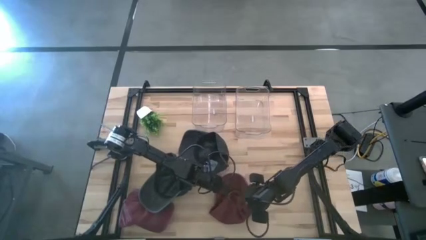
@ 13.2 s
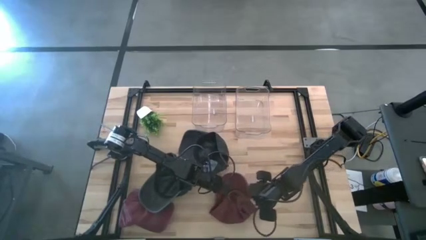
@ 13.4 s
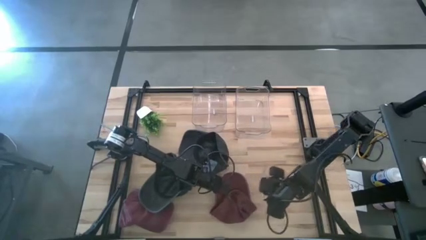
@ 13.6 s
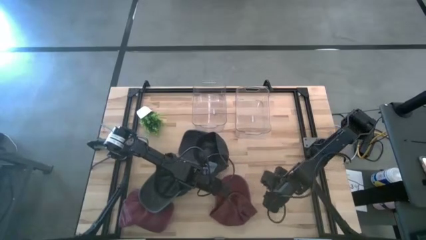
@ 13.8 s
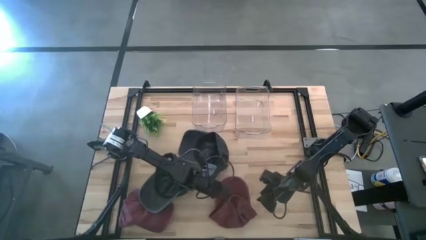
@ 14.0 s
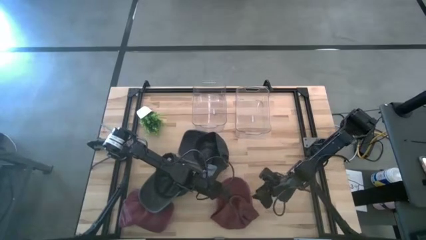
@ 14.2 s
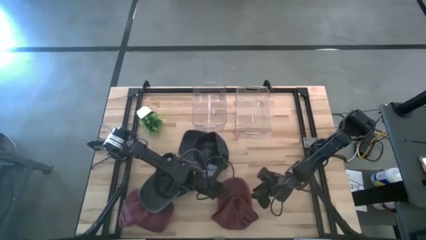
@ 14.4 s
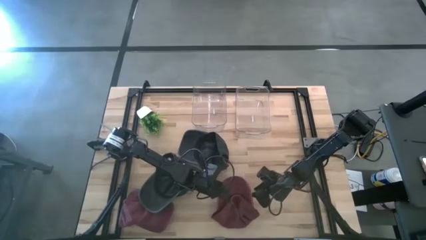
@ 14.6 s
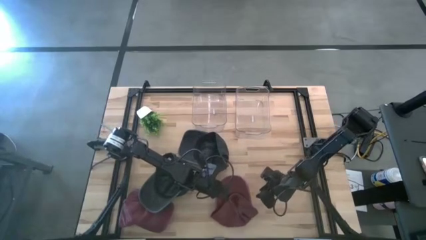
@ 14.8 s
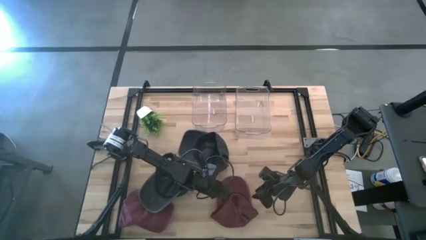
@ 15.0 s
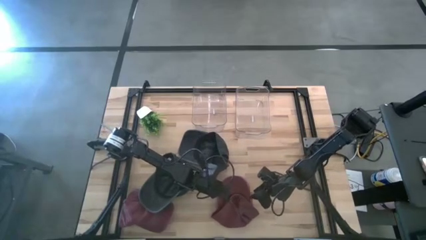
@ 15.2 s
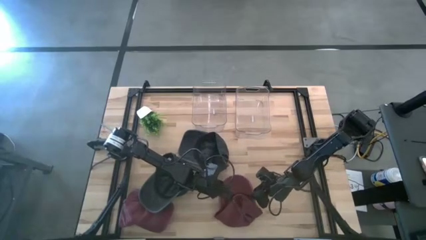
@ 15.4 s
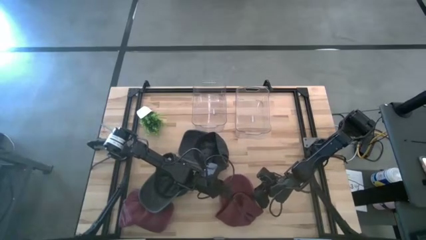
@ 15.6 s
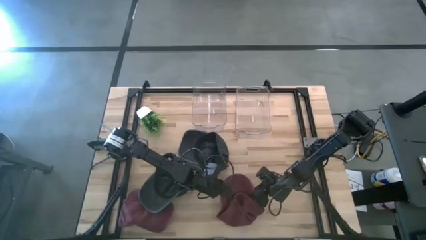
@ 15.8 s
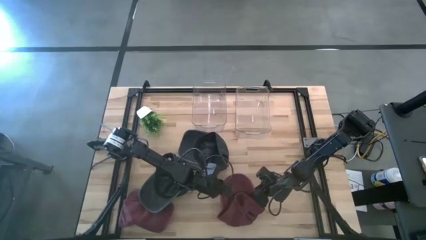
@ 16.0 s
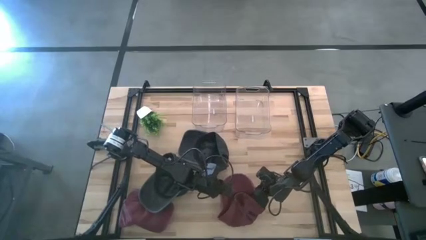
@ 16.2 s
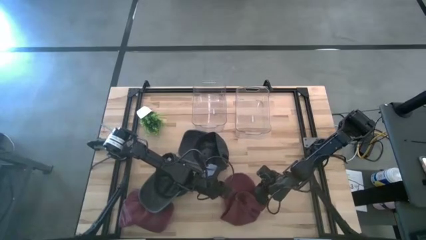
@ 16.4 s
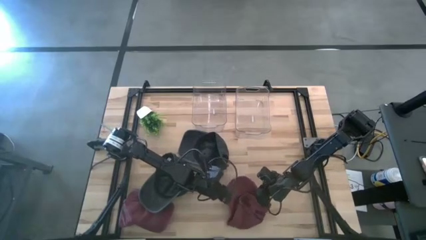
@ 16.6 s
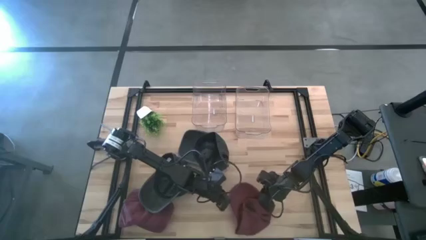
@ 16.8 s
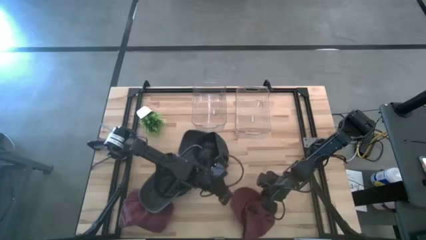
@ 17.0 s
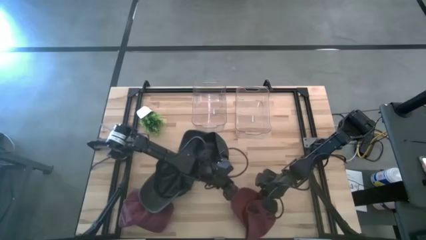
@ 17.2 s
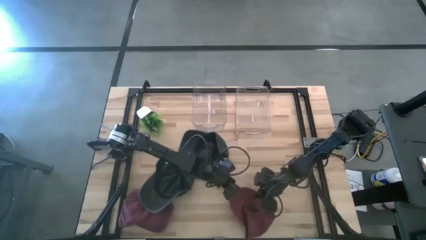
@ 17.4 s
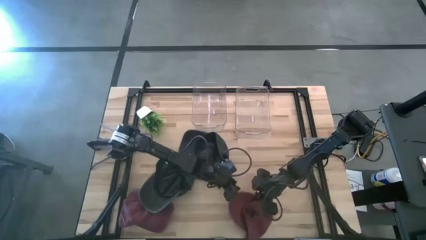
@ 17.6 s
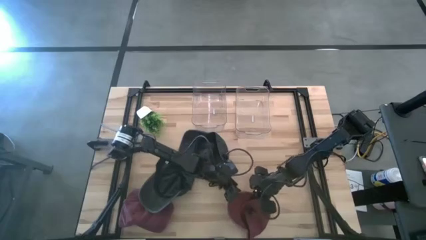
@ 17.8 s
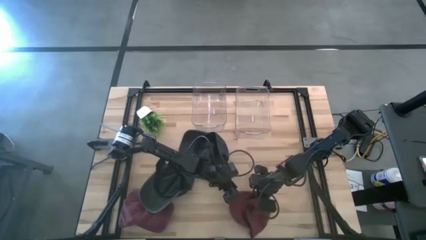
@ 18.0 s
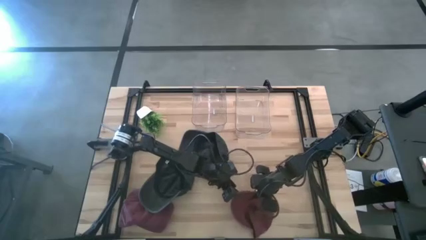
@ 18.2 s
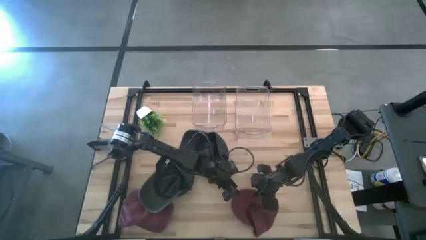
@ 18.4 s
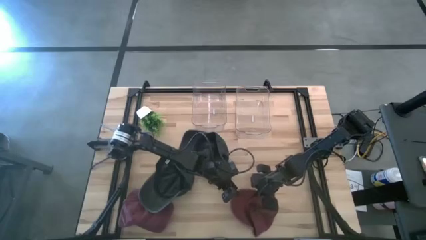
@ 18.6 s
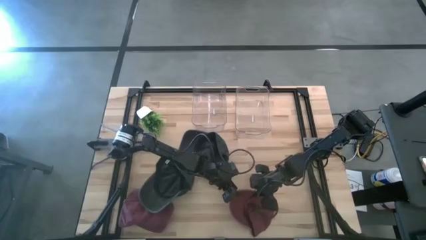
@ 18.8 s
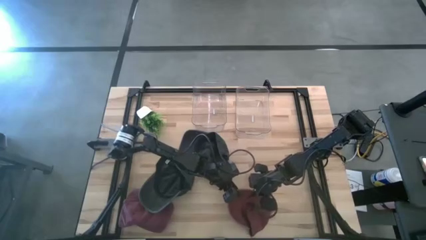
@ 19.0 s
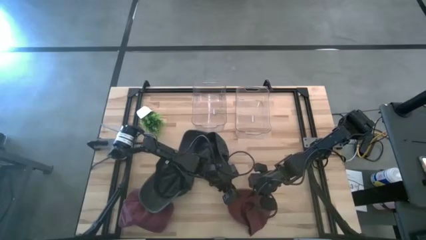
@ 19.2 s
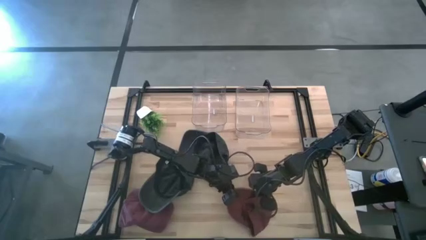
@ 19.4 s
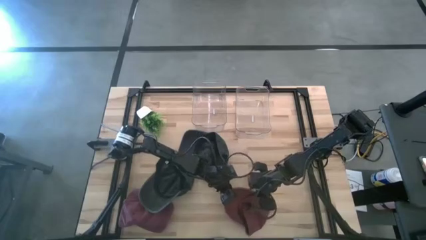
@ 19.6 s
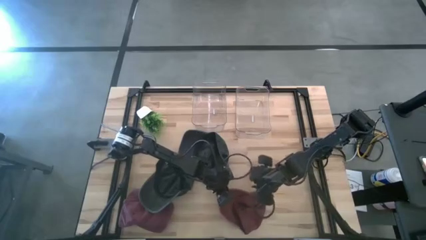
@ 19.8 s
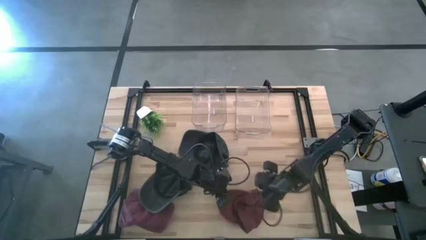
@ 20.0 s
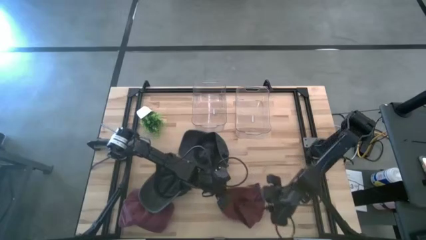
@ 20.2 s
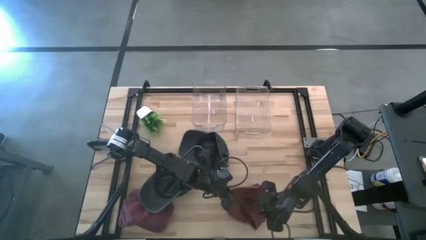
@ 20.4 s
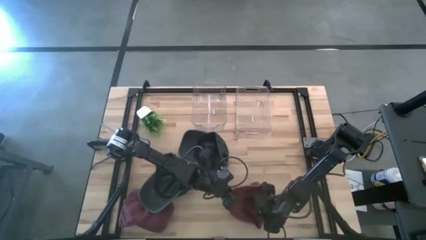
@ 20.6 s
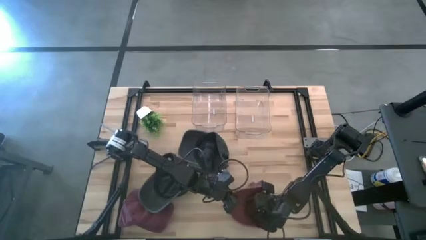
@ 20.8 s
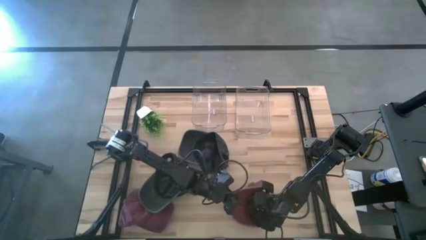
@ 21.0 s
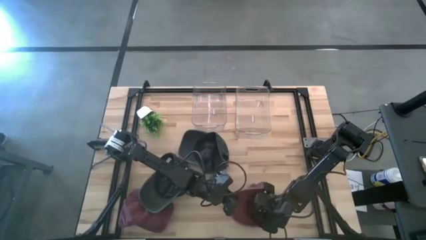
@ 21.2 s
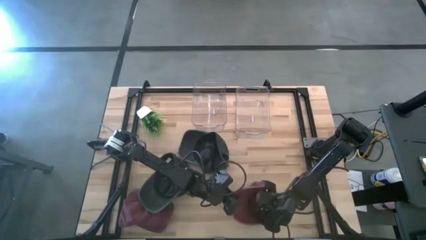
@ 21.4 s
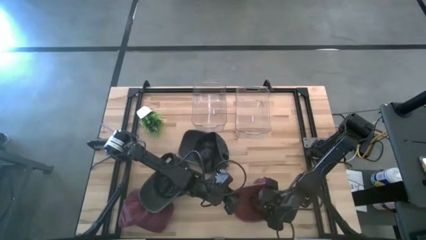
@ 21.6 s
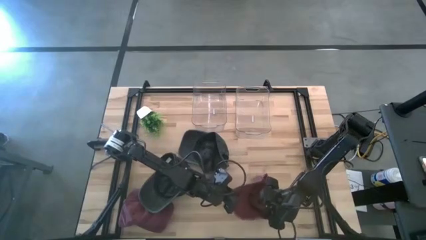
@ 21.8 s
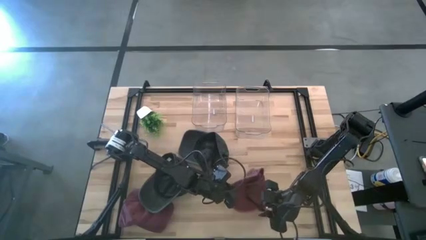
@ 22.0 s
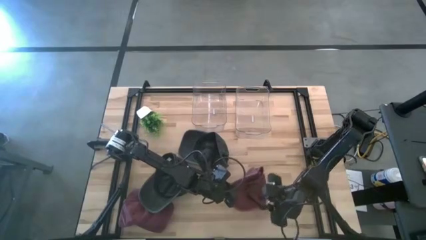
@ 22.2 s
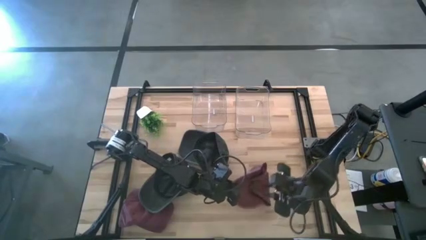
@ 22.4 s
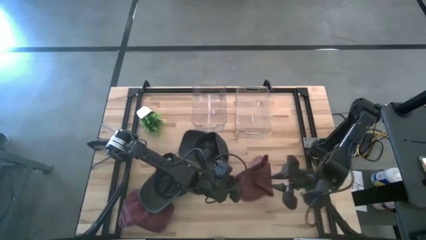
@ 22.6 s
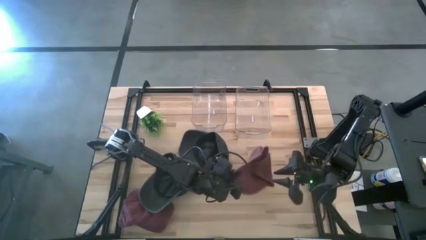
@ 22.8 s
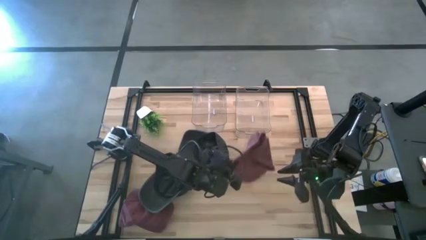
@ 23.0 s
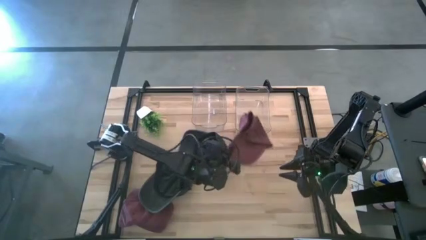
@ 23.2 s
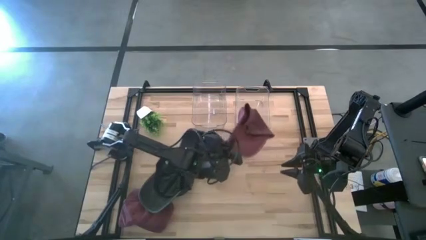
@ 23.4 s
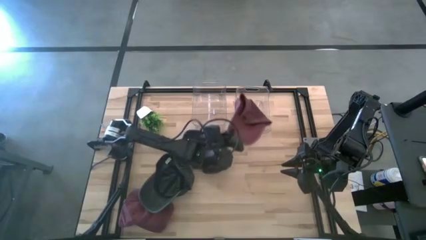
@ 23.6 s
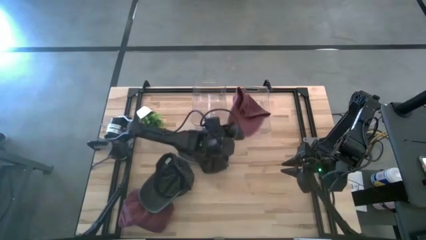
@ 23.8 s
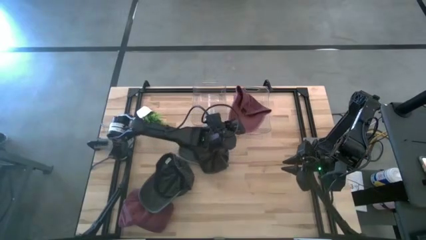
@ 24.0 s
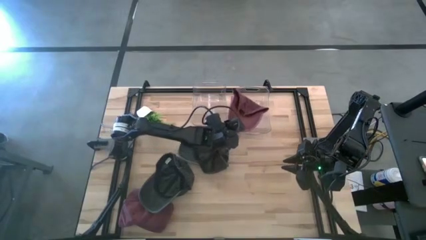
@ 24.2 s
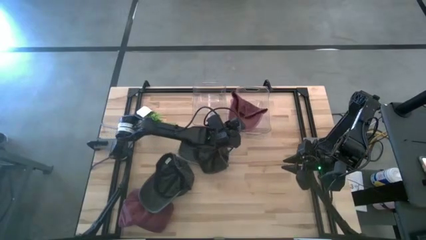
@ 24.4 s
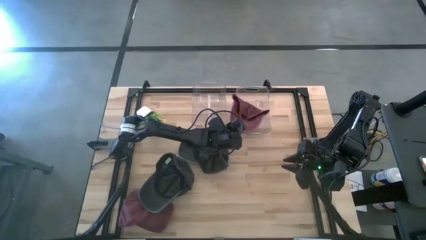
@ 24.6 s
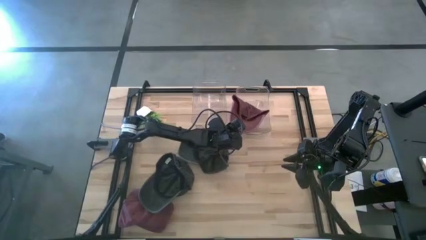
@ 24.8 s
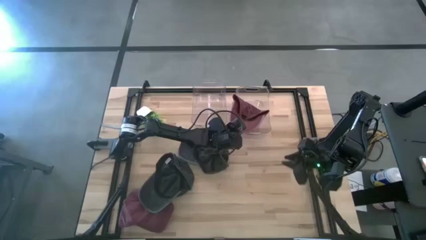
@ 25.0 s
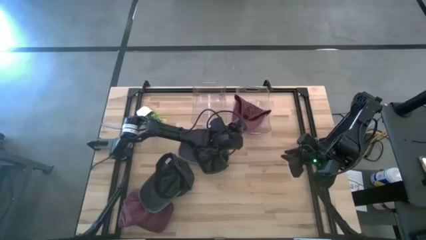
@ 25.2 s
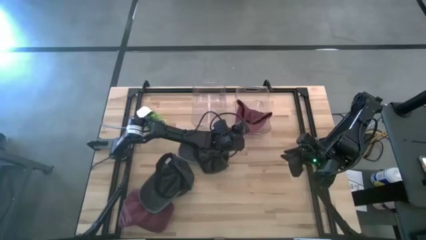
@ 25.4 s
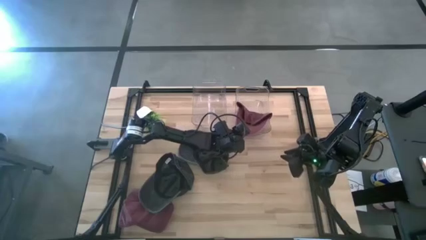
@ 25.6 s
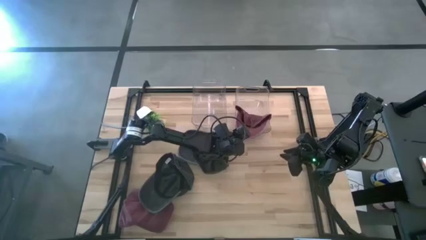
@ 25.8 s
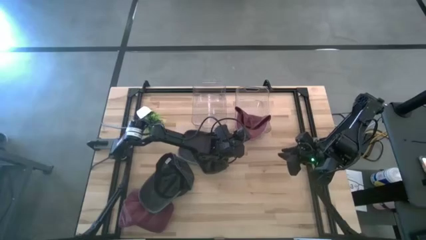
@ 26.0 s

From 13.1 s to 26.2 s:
Task: Pick & Place hat
Put the right red cap into the right transparent bin
